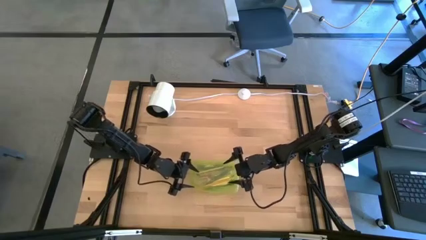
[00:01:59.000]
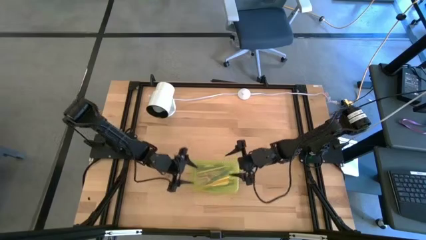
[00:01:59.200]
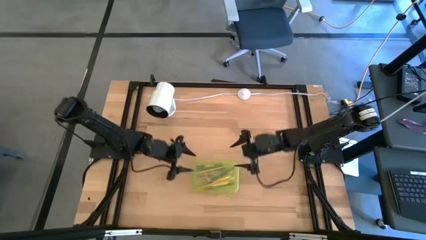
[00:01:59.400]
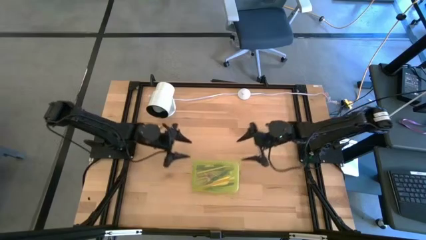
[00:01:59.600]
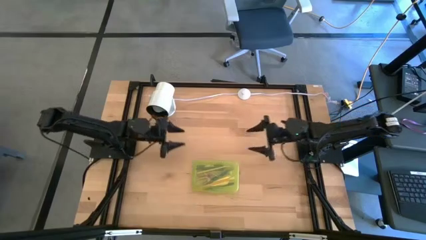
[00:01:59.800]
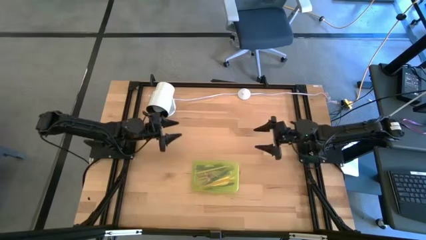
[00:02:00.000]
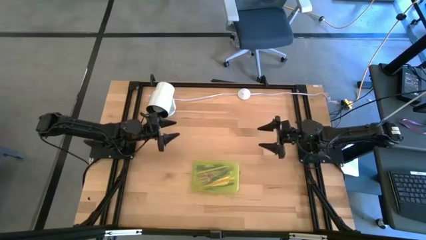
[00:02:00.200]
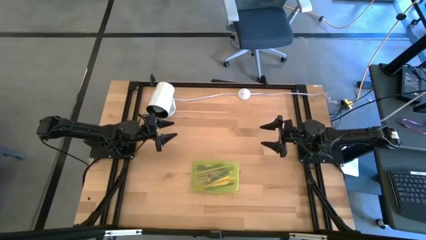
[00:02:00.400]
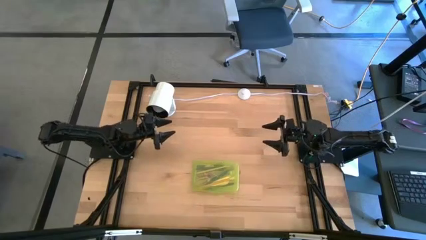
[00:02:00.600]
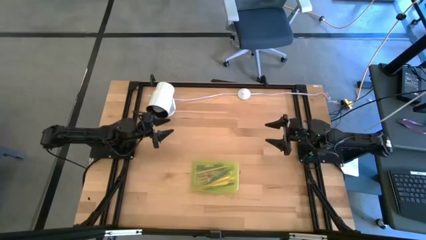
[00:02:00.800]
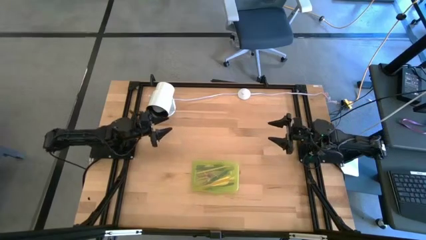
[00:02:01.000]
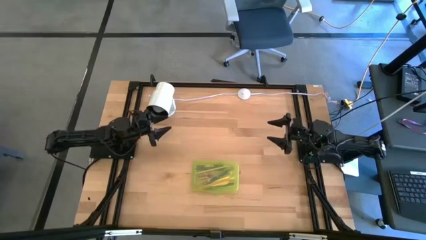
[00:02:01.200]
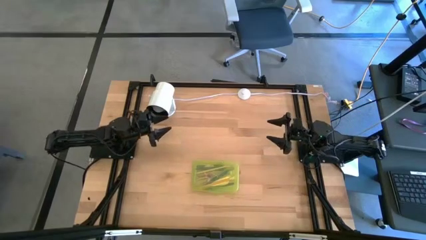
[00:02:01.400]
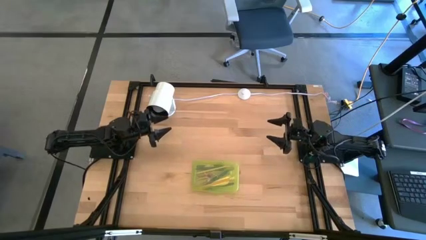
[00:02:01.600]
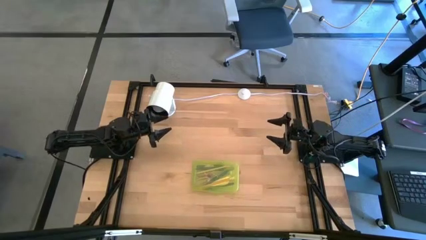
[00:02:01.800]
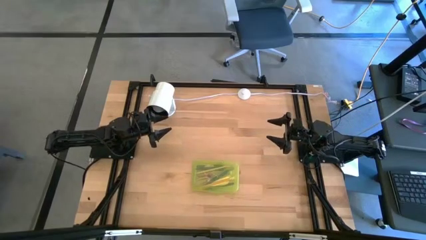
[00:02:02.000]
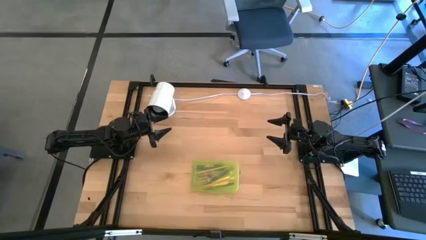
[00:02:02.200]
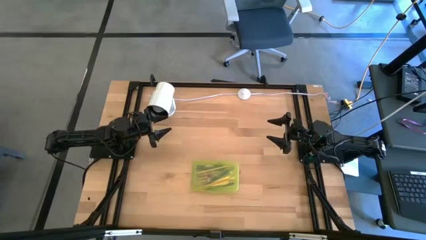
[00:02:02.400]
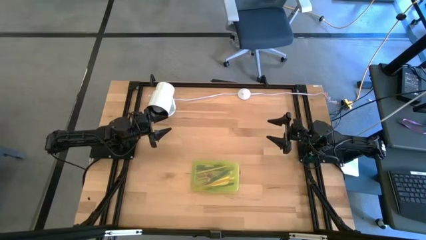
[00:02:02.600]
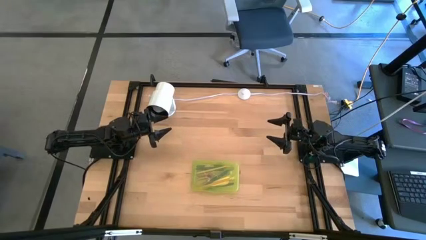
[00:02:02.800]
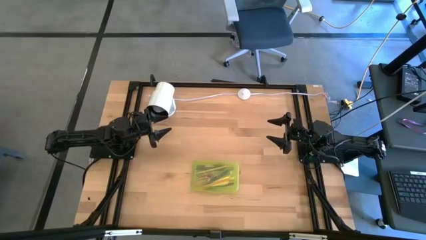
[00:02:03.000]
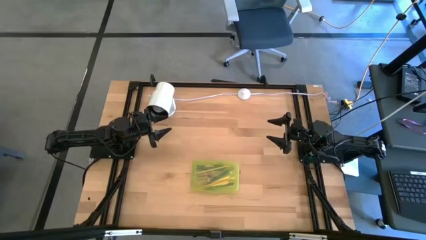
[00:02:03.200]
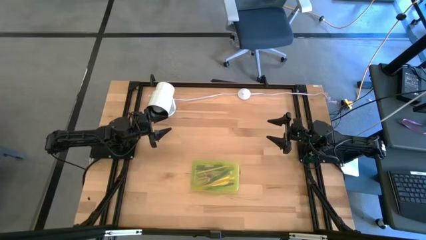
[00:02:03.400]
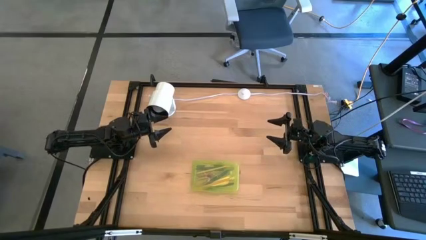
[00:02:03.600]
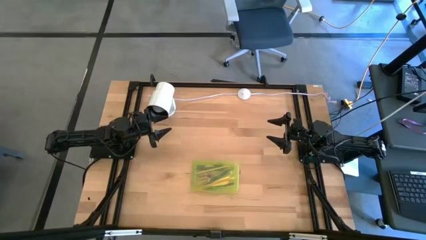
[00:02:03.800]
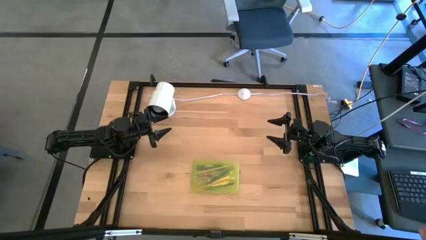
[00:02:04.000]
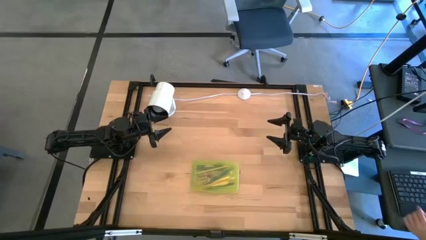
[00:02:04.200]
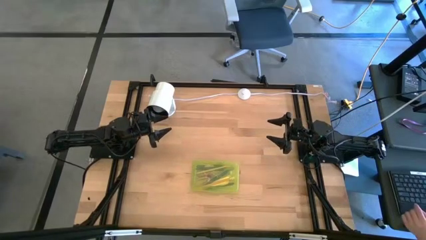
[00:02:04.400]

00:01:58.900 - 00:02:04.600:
Task: Pick & place school supplies into a supply box
Return to Home Position

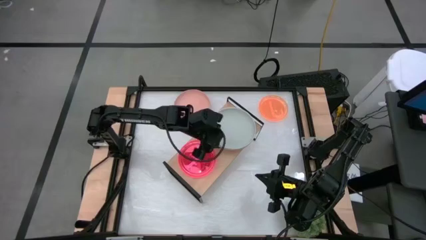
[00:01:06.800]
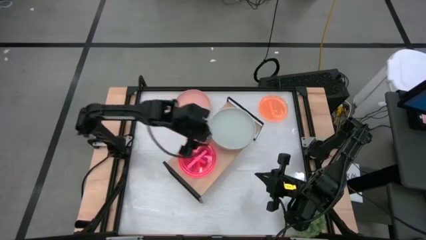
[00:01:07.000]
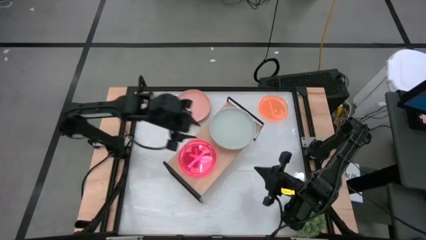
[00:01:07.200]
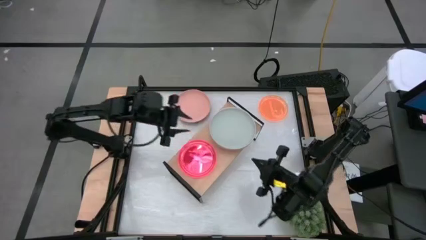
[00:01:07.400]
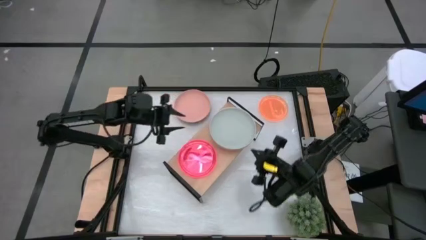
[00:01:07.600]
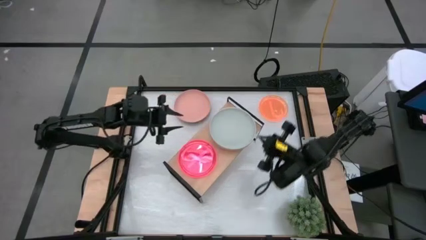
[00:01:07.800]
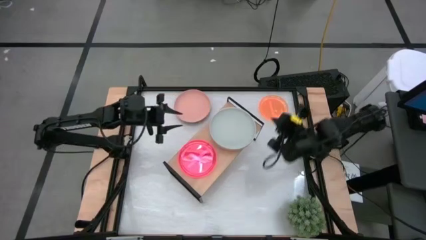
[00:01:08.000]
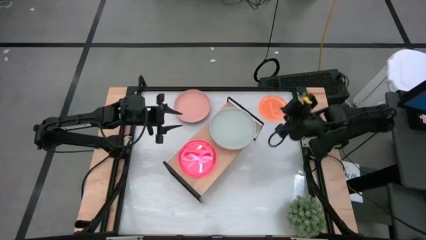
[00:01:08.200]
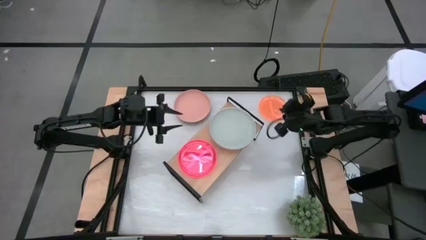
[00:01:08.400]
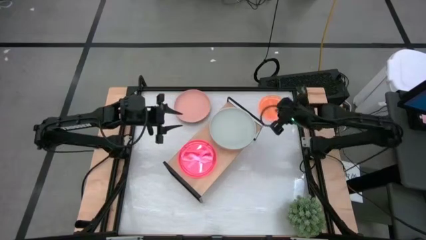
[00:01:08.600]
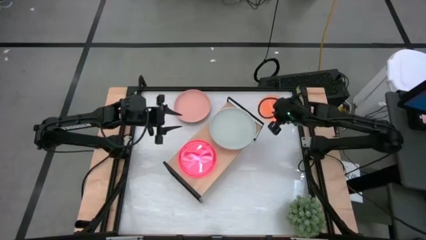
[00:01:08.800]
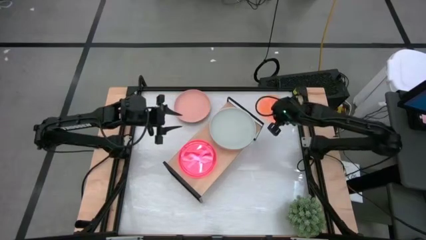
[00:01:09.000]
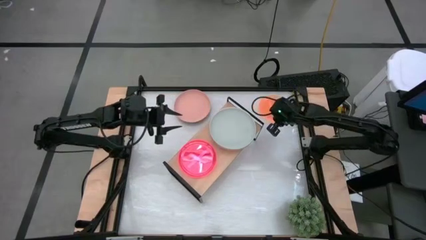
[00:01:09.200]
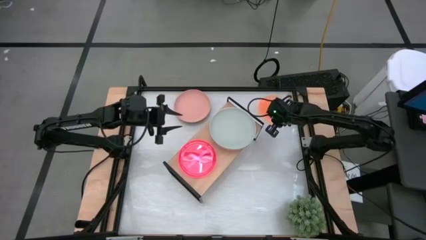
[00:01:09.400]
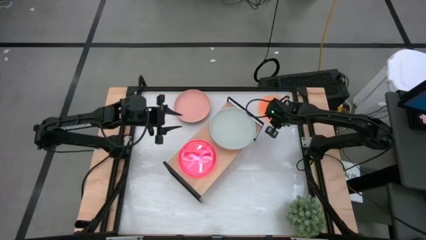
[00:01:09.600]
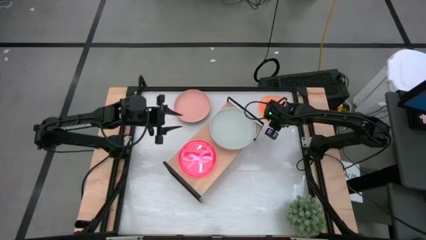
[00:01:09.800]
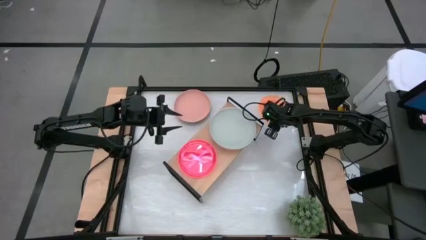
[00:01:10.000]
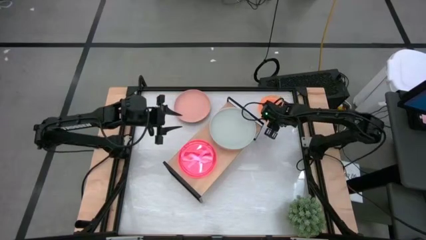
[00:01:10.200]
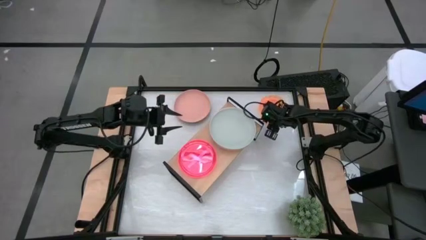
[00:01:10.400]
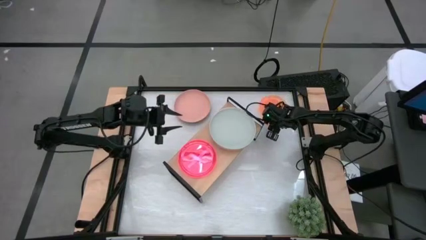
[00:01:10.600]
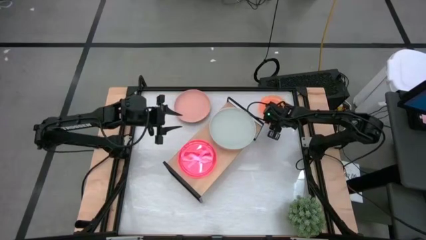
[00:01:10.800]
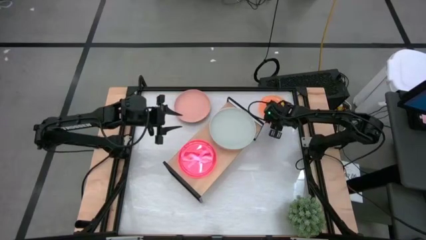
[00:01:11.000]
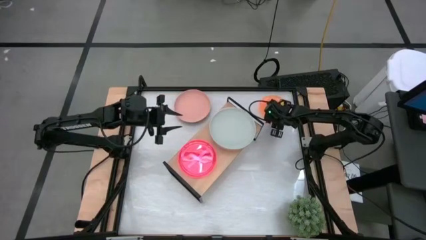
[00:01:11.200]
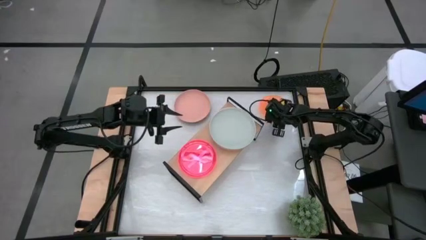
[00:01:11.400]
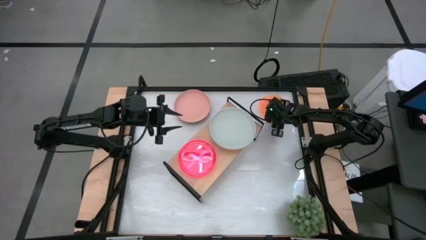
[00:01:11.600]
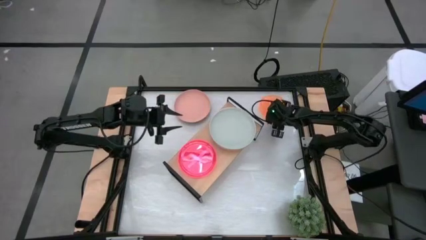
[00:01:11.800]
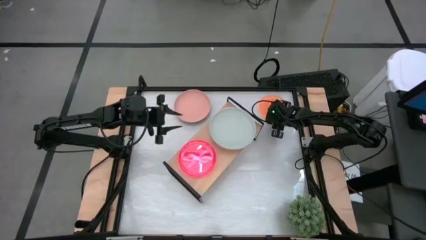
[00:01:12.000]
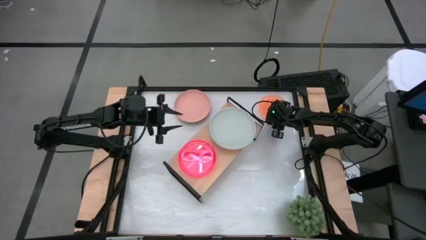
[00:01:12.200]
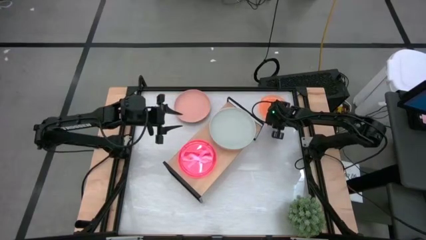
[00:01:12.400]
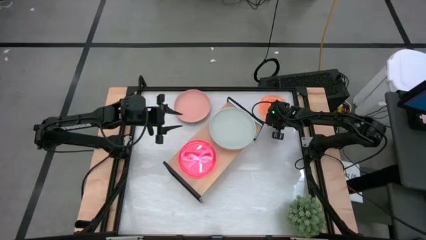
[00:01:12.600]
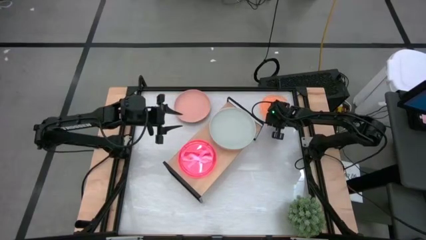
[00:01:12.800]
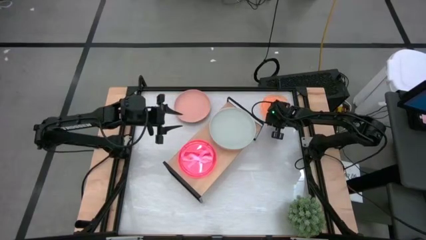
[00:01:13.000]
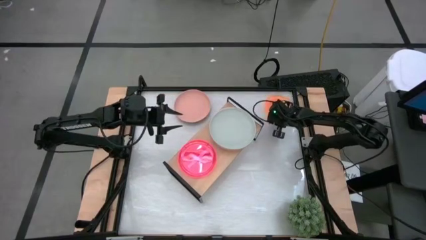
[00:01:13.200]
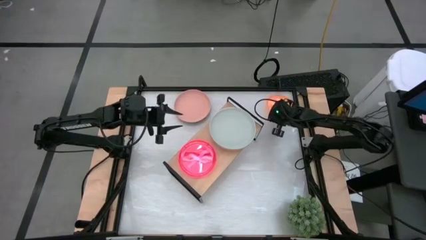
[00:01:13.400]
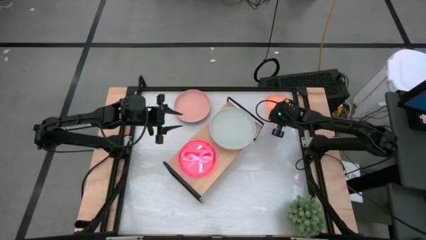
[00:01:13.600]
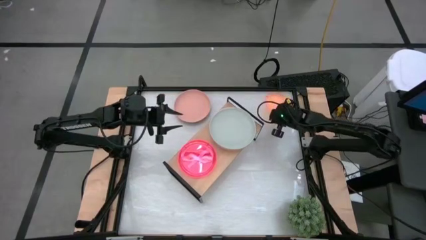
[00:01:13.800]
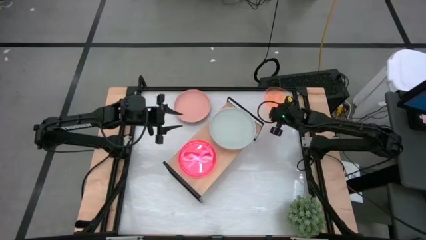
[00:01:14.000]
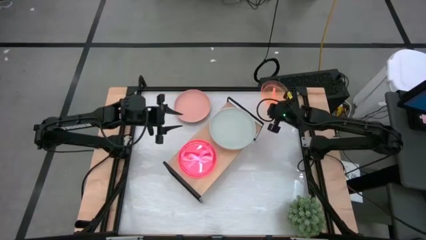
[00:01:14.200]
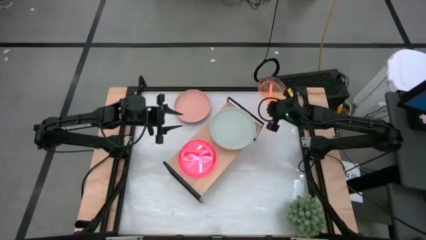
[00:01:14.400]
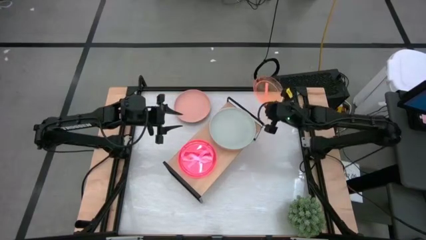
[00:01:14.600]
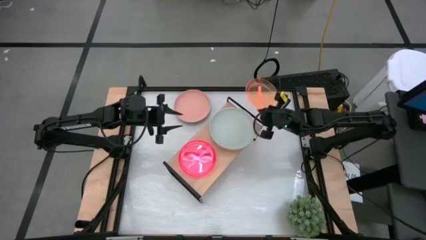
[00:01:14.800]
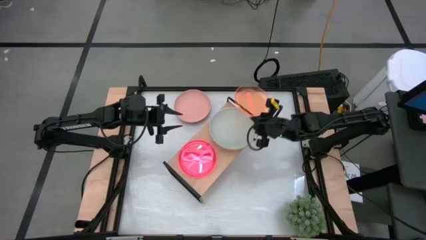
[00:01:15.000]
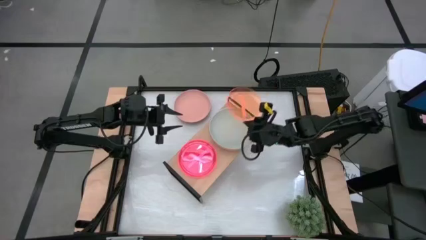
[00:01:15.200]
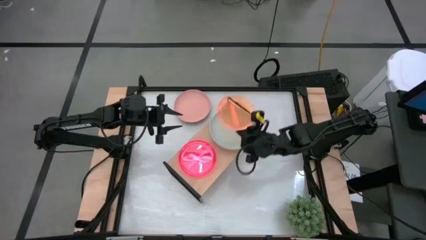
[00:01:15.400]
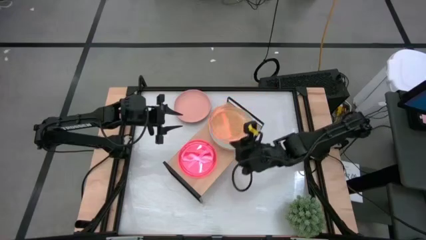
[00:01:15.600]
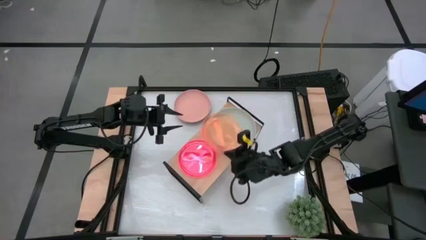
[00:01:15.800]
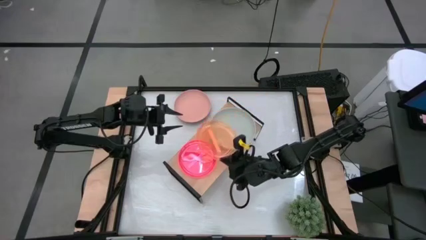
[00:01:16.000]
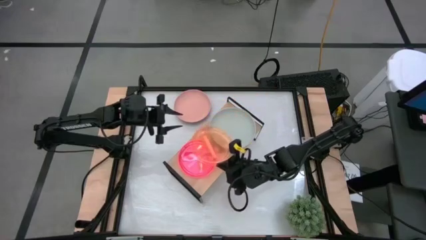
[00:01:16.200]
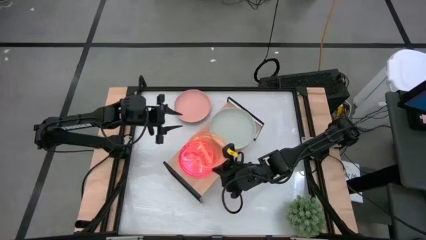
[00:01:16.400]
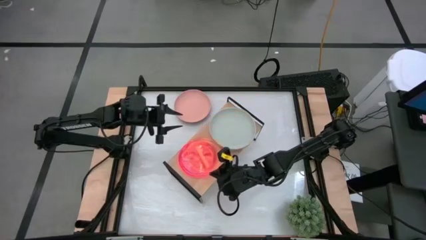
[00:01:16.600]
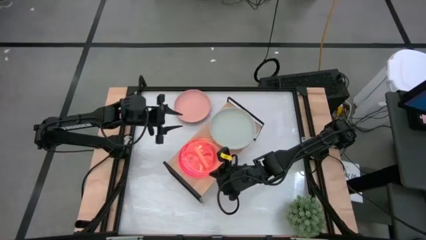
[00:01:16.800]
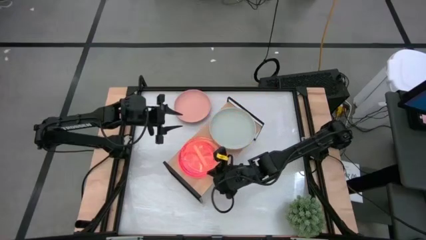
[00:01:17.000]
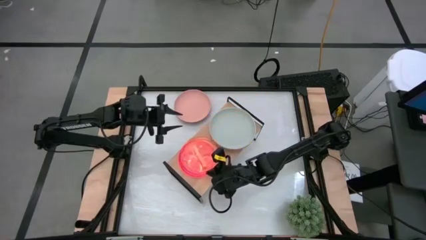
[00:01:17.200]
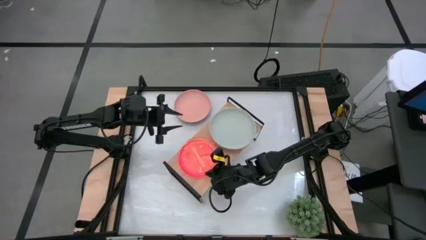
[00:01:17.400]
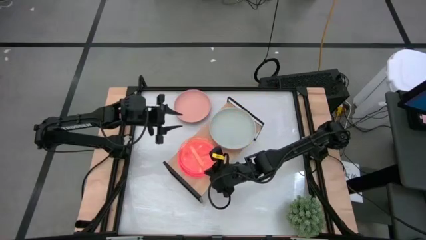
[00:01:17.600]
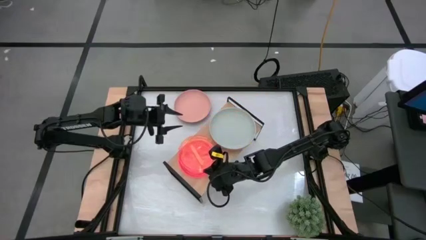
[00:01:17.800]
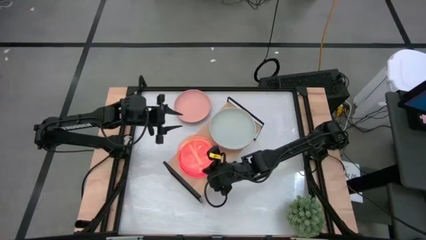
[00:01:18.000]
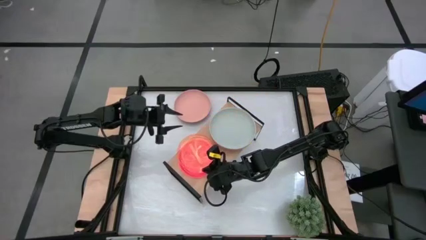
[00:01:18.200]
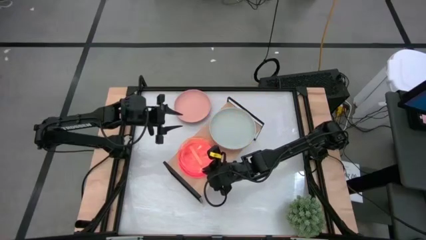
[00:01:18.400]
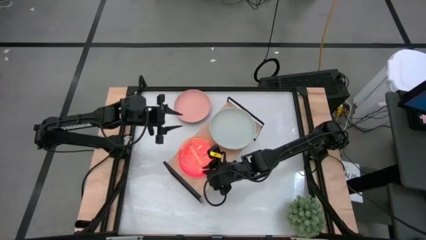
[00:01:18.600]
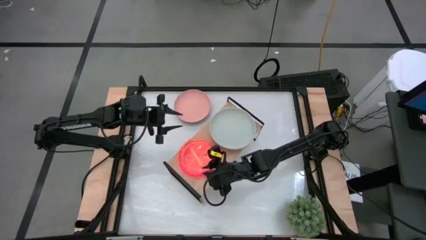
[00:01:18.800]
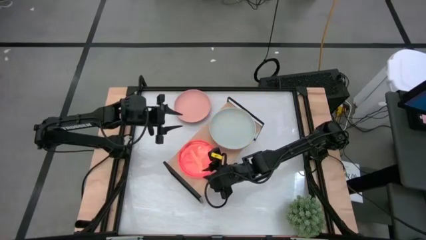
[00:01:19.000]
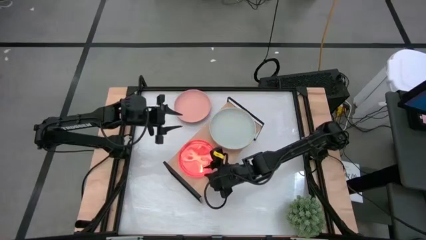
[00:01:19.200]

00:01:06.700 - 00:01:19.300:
Task: Place and stack plates onto a shelf
Stack the small orange plate on top of the small pink plate on the shelf
